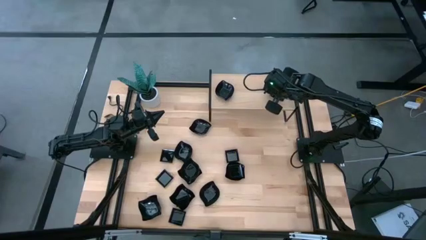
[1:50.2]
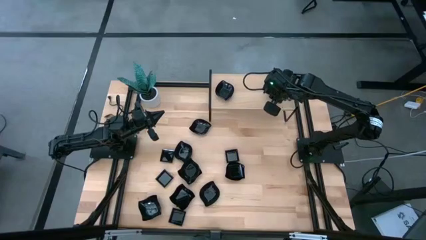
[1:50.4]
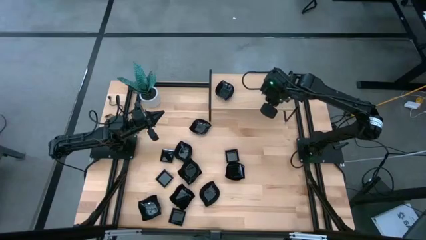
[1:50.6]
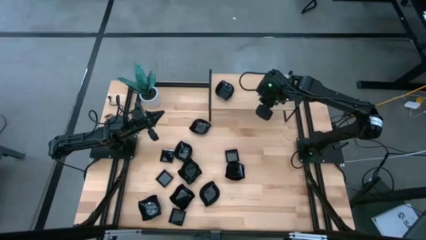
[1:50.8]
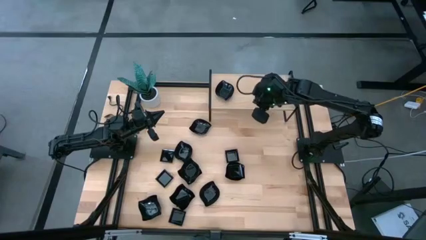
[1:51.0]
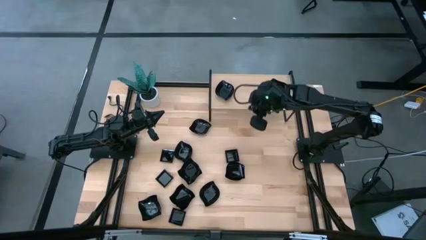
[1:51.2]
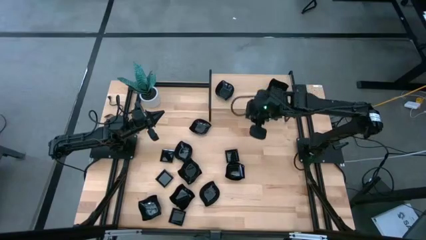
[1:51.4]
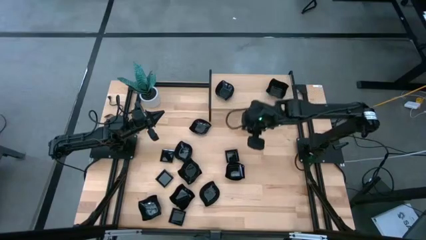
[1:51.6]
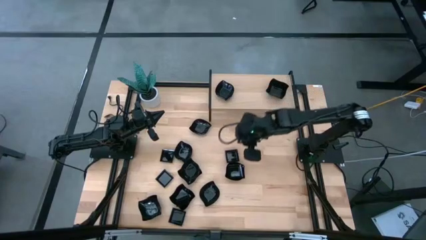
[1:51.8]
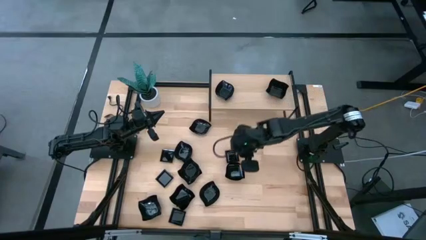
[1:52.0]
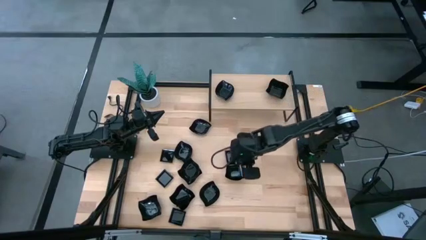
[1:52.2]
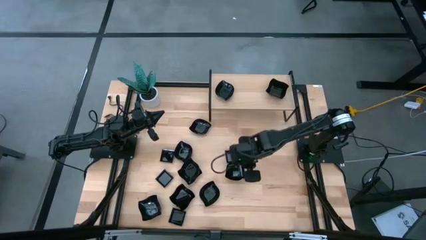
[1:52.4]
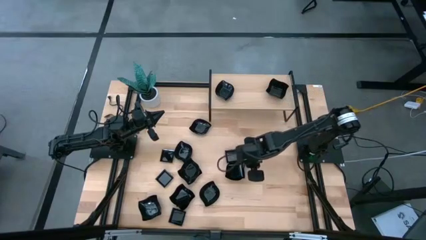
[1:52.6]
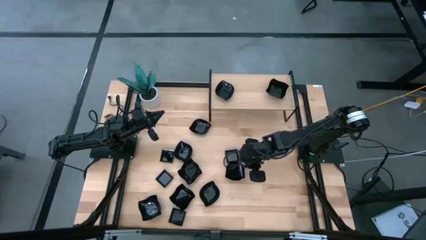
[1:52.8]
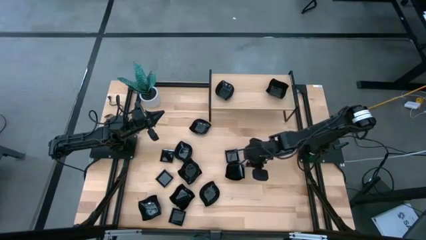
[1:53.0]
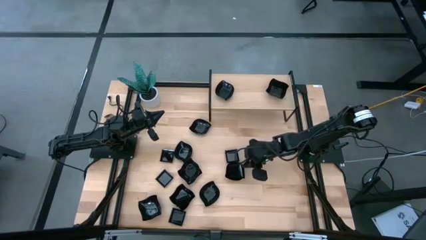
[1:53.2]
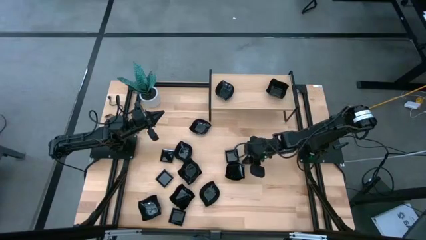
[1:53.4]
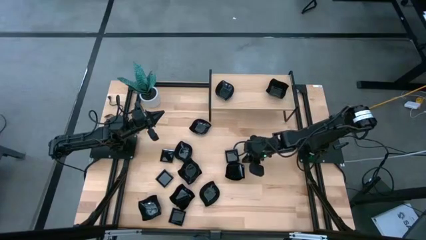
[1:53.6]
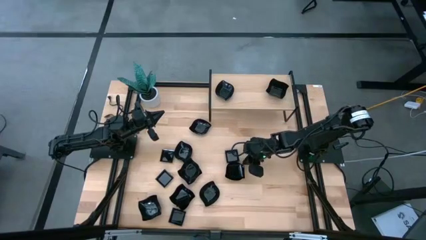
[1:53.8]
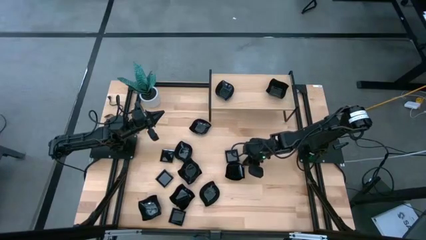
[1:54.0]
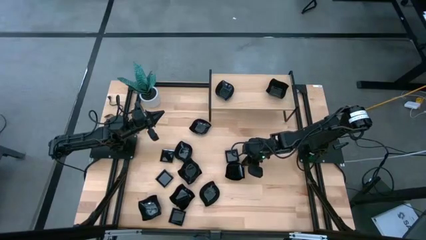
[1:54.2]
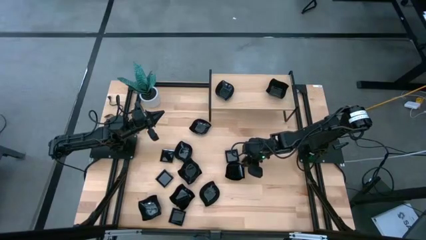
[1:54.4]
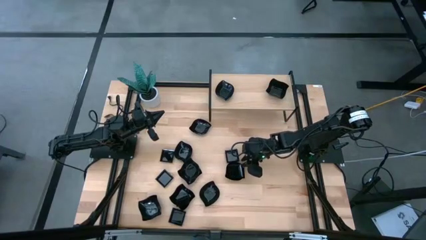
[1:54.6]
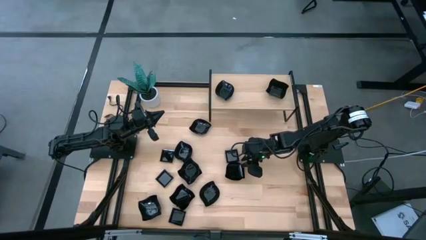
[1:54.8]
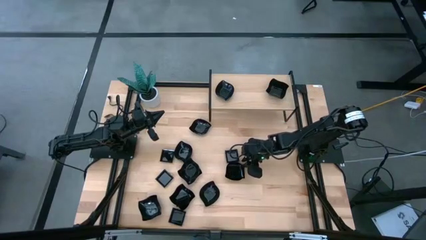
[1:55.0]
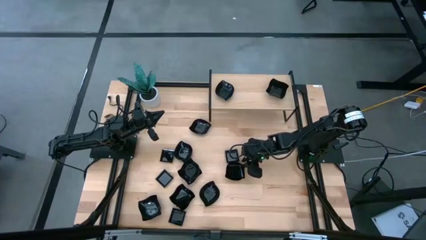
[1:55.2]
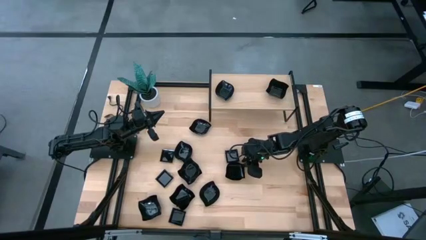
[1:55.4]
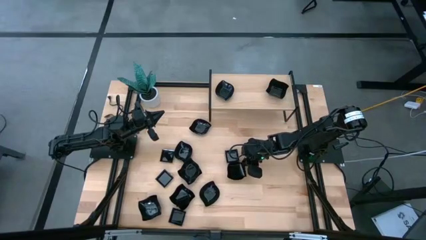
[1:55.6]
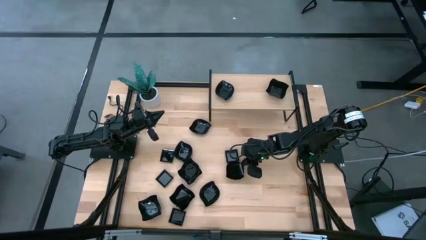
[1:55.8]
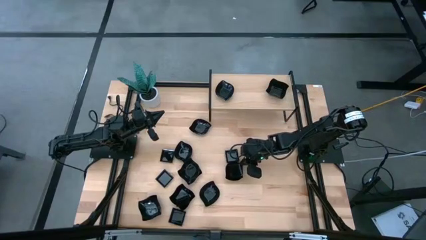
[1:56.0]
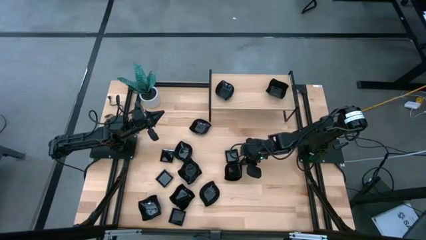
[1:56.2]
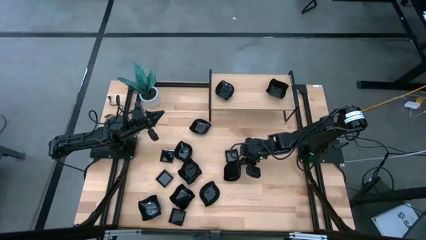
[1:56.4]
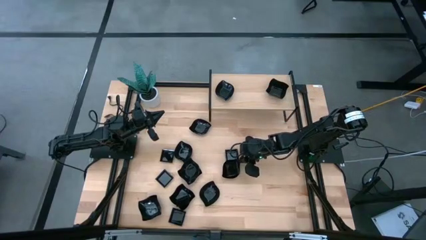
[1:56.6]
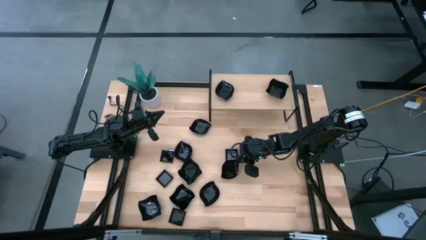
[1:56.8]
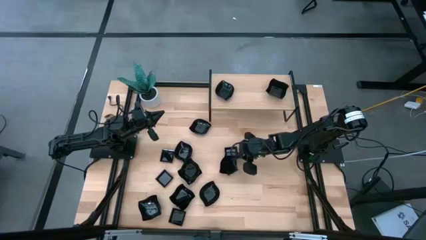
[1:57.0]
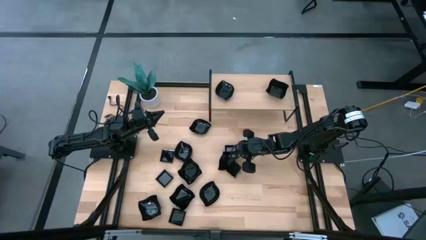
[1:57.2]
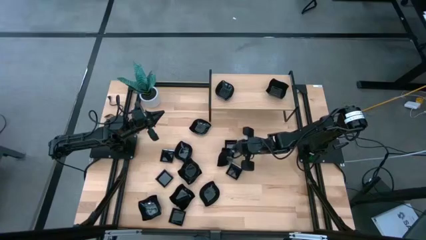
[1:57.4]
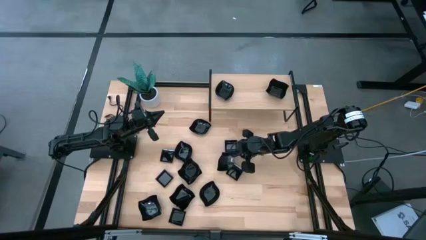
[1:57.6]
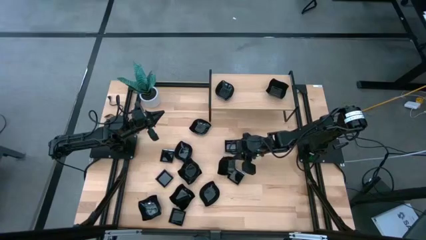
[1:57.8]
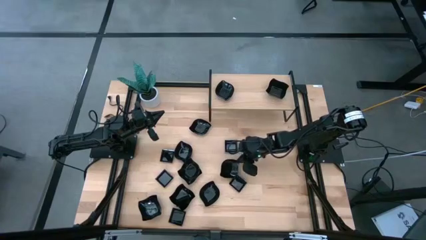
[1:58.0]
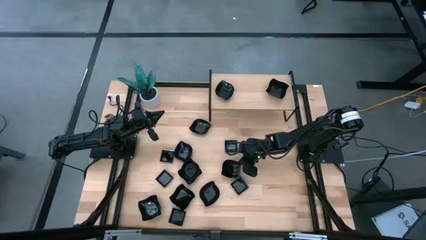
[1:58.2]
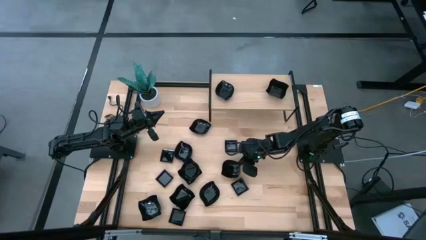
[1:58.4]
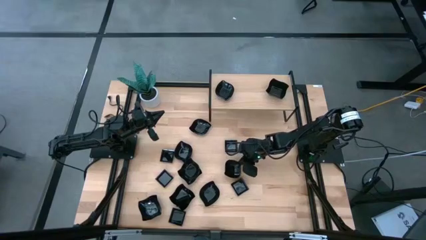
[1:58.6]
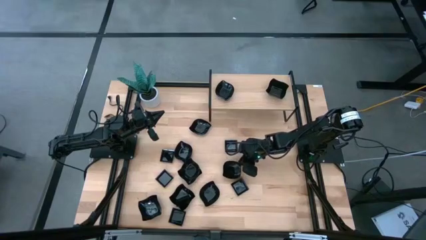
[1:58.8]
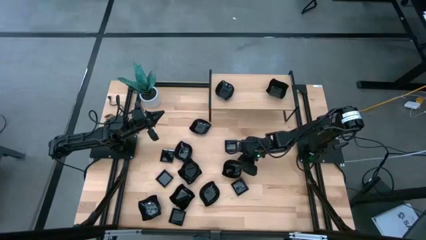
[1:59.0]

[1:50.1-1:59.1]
Task: Pick & Place Mini shaped plates
Stack the black leaf-shaped plate on top of the black leaf-shaped plate on the shelf

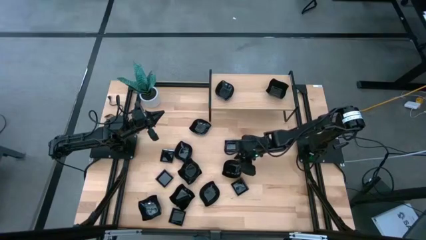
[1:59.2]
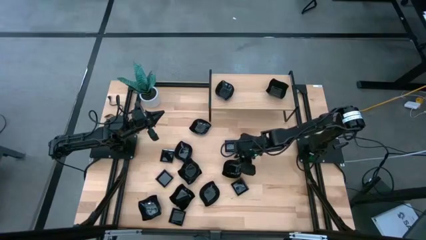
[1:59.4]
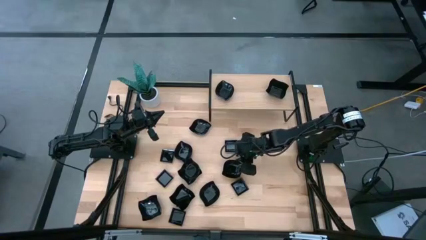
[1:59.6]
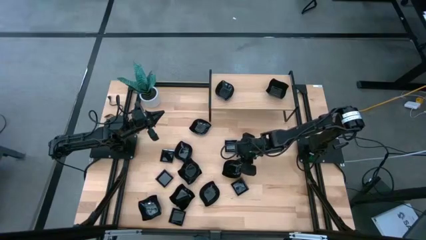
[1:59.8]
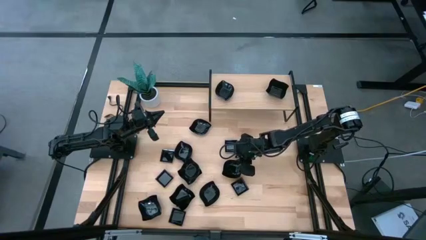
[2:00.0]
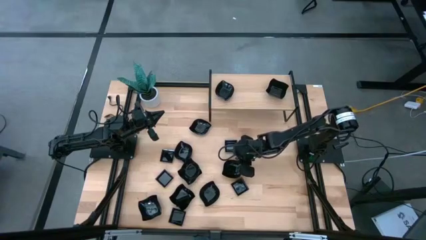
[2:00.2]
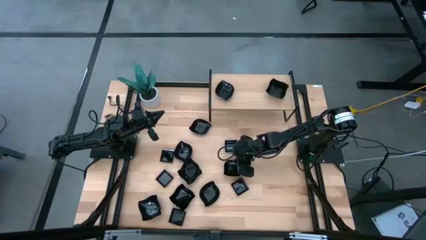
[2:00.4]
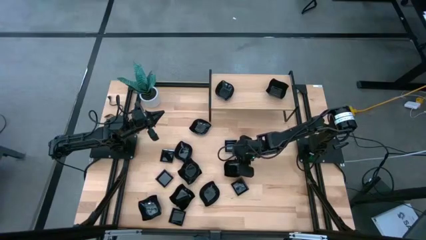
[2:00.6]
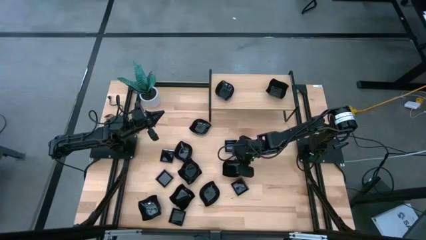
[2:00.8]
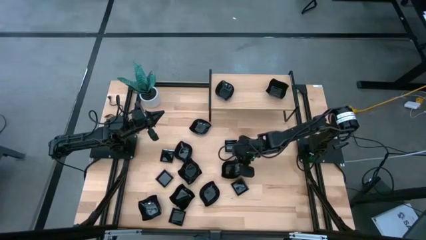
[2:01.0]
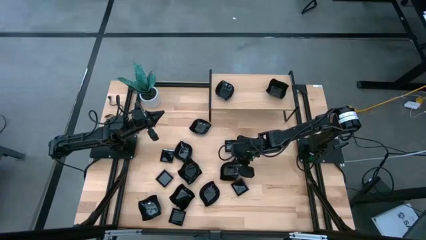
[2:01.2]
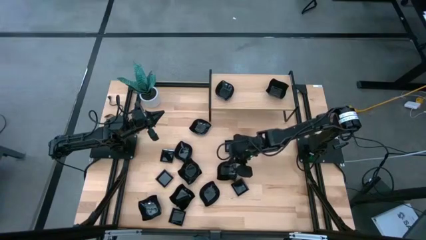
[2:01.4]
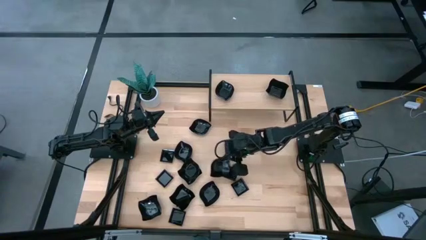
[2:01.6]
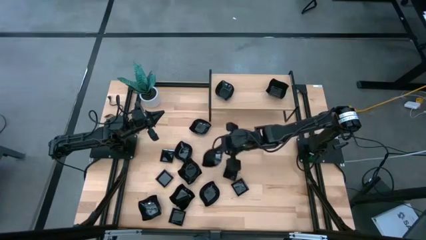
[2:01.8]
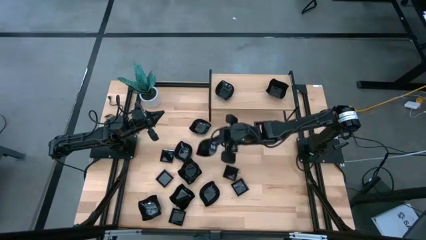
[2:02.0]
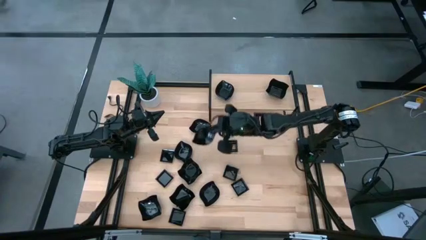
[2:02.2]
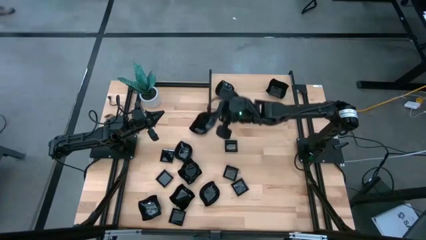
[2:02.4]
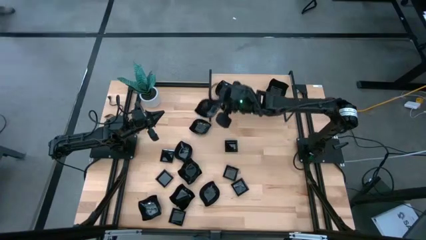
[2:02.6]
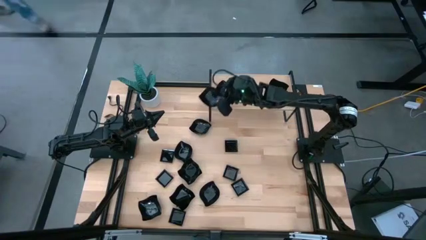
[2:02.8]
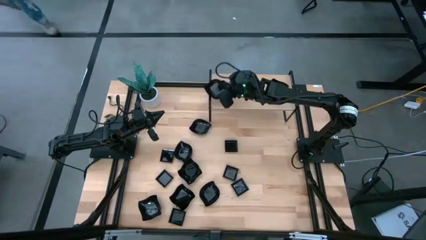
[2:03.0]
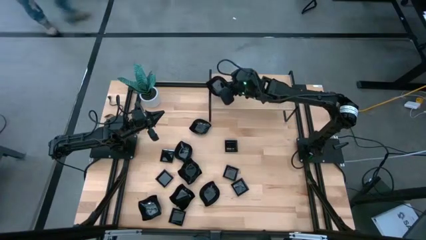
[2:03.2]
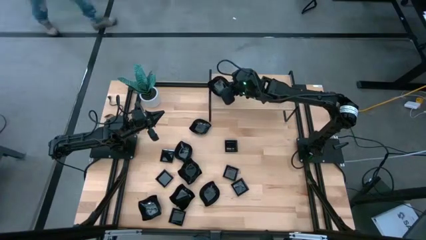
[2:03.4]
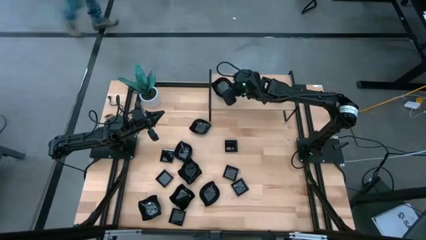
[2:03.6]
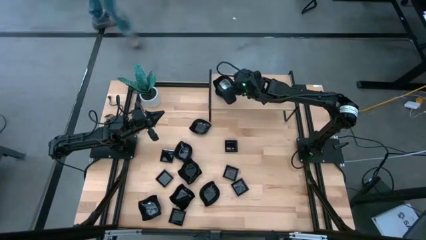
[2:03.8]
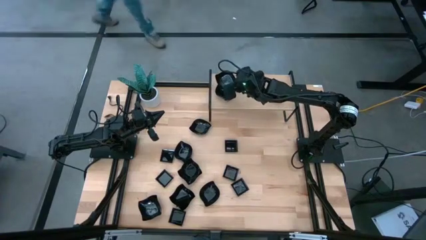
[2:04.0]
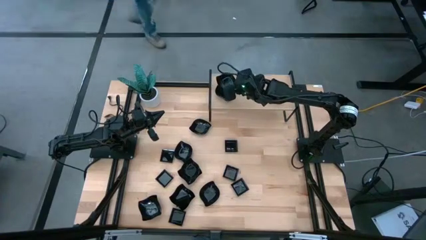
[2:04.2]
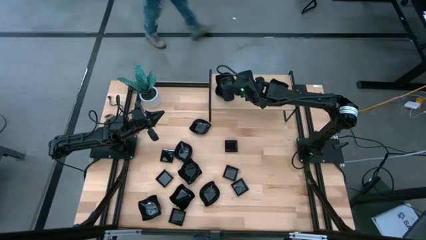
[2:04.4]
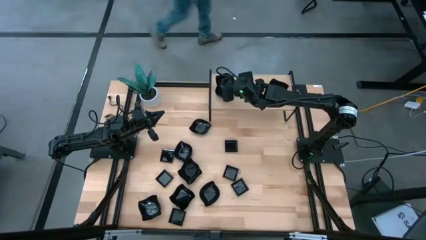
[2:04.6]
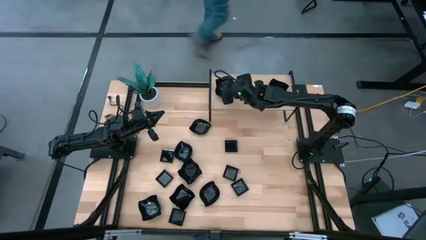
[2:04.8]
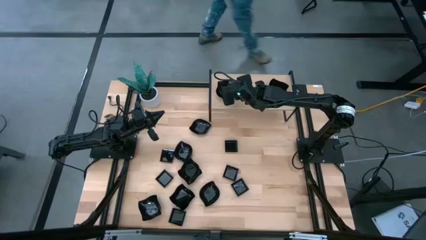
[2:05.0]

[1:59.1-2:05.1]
Stack the black leaf-shaped plate on top of the black leaf-shaped plate on the shelf

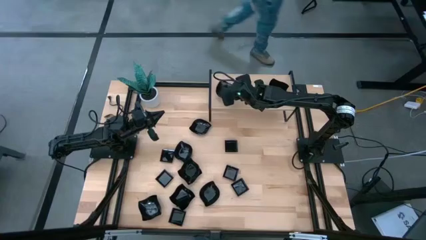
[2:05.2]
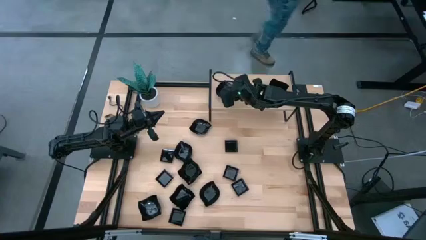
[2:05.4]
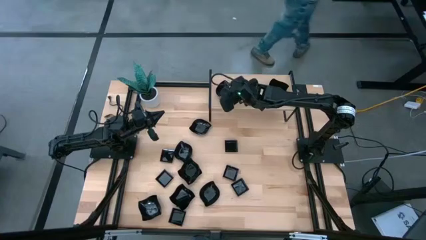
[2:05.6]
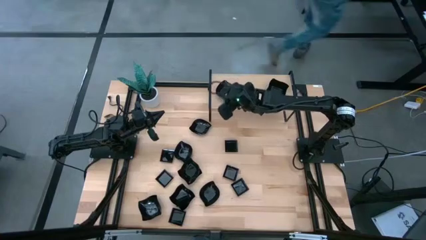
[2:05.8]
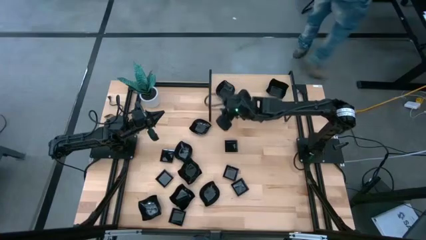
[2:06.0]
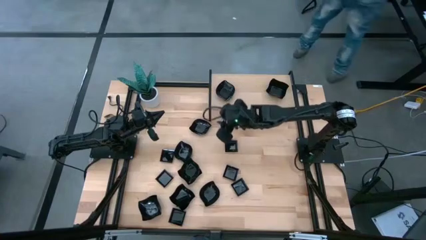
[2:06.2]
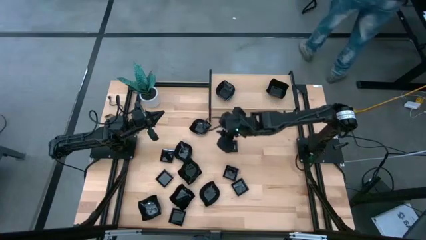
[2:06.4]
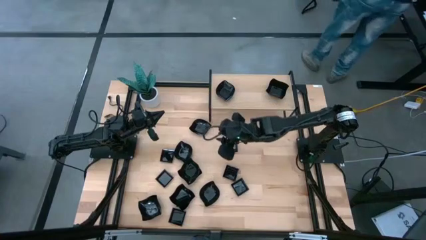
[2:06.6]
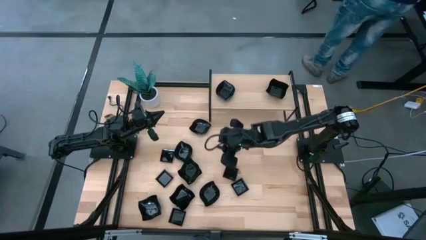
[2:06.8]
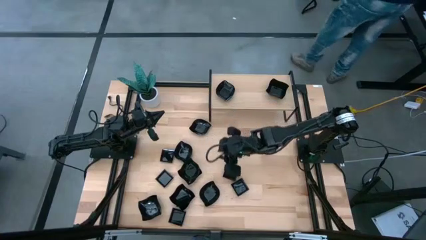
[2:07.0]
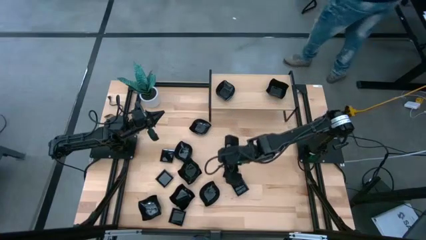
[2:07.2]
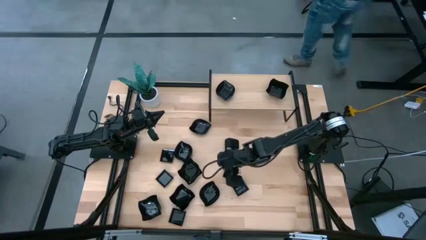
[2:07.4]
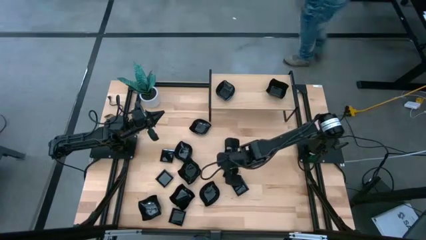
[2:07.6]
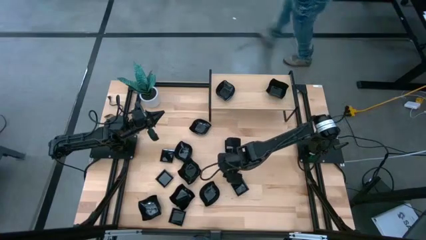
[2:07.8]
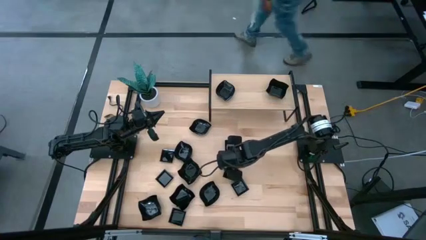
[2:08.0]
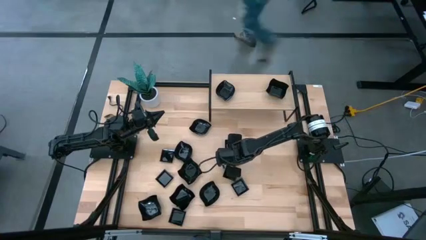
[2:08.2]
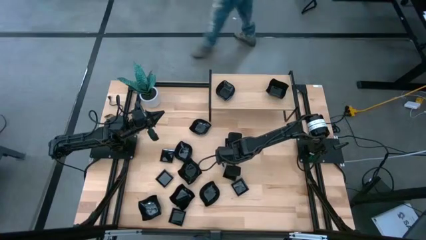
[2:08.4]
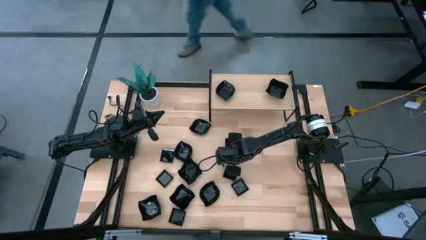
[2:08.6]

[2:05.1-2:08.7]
Put the black square plate on the shelf
